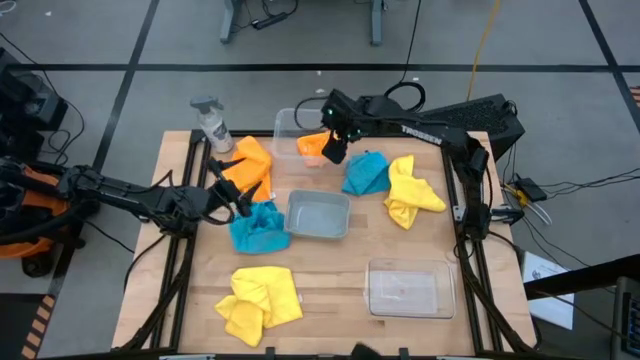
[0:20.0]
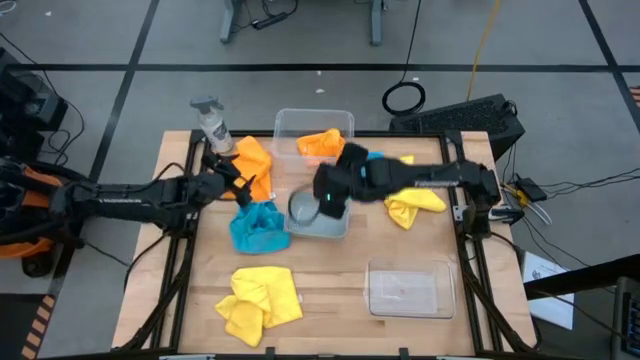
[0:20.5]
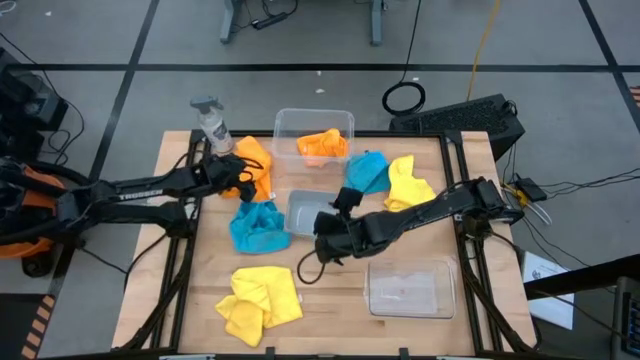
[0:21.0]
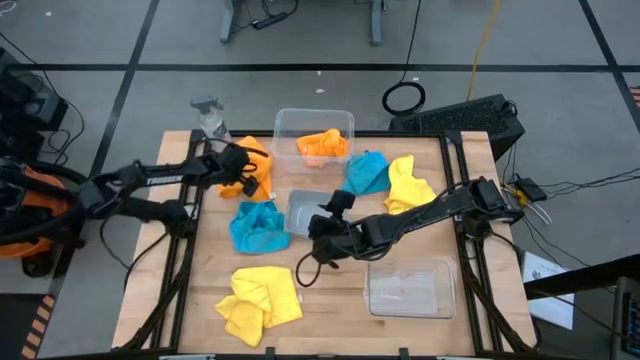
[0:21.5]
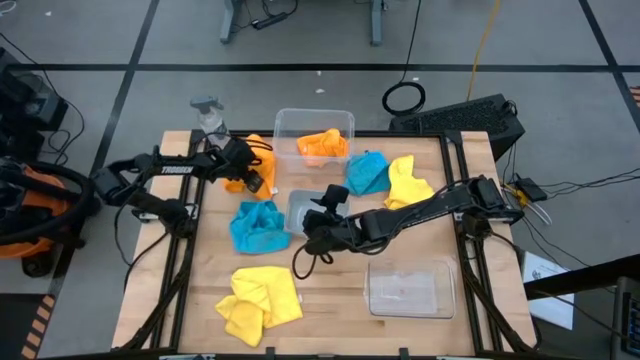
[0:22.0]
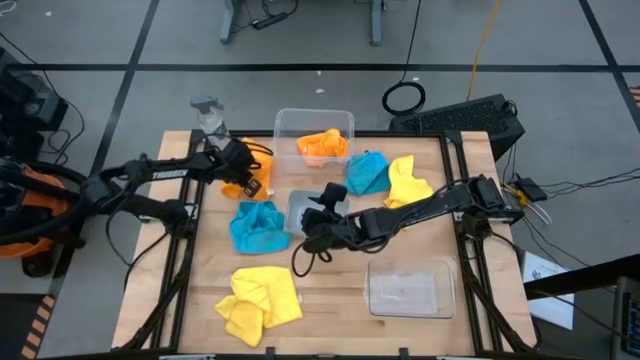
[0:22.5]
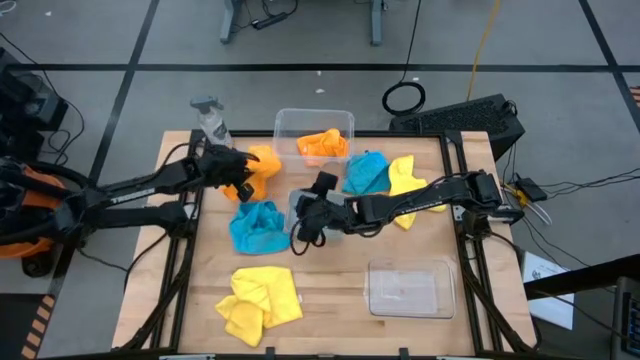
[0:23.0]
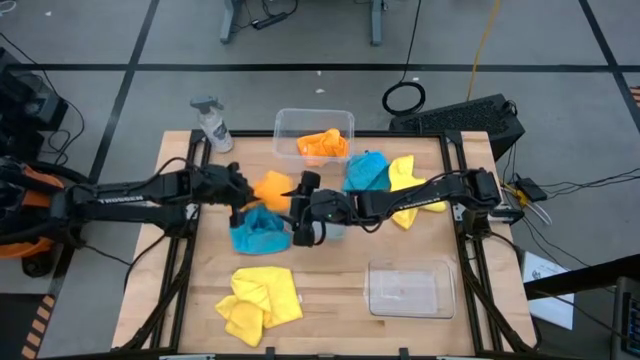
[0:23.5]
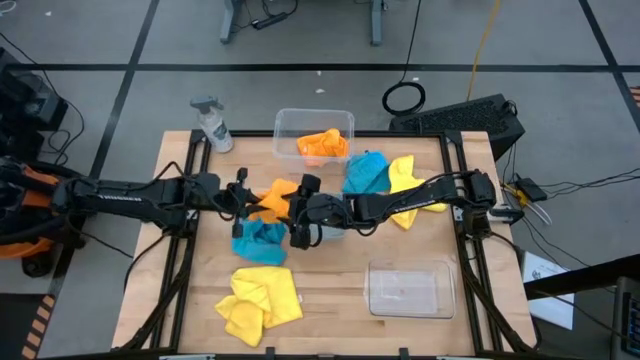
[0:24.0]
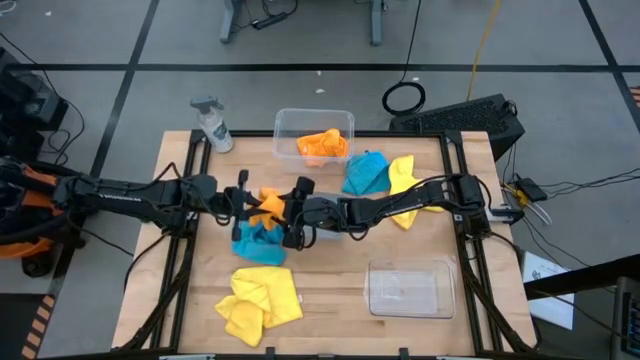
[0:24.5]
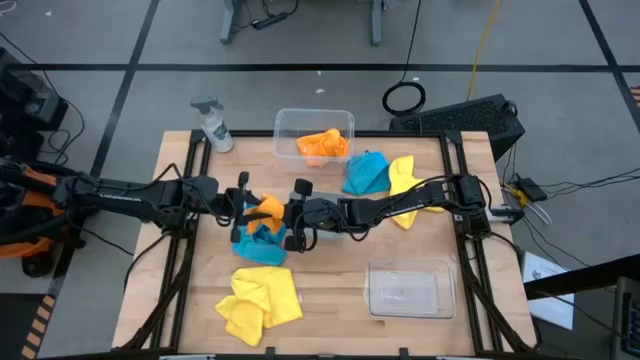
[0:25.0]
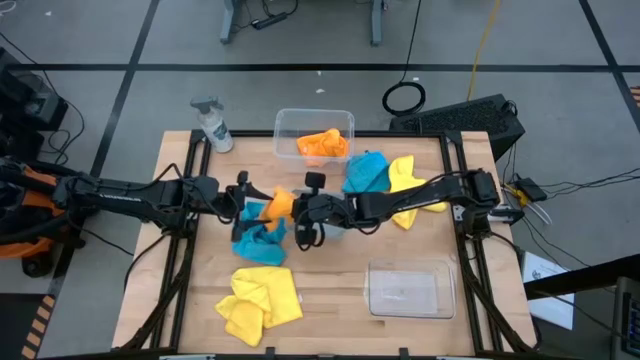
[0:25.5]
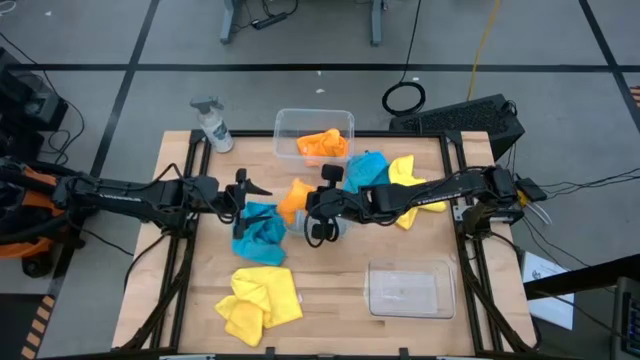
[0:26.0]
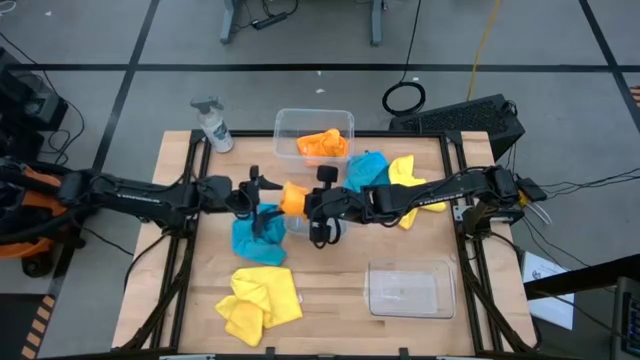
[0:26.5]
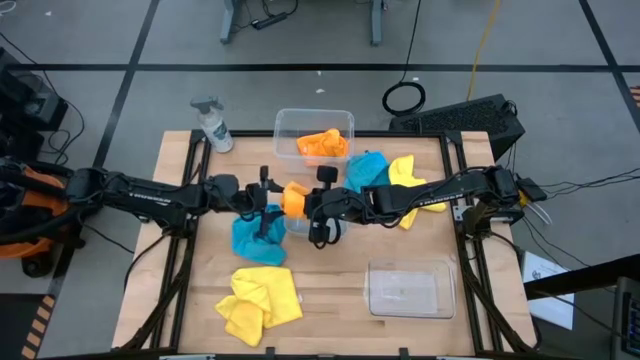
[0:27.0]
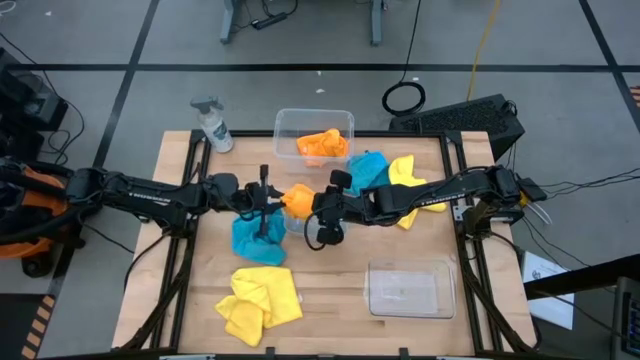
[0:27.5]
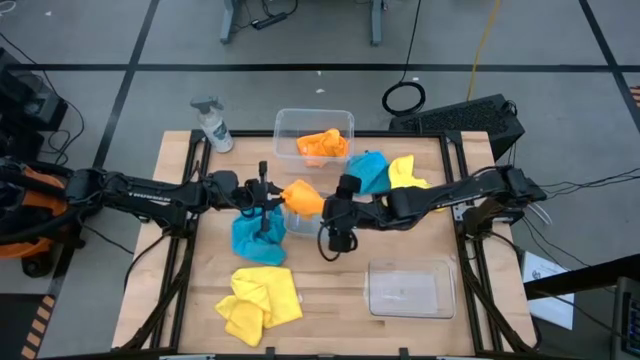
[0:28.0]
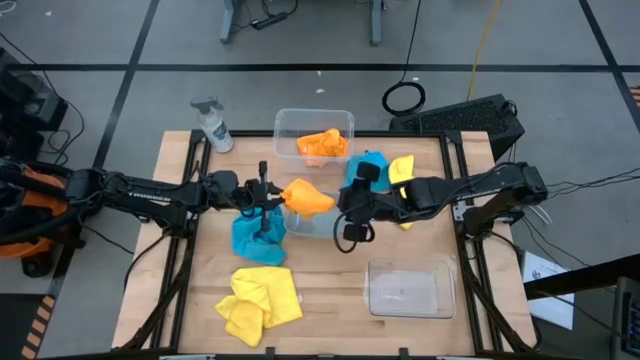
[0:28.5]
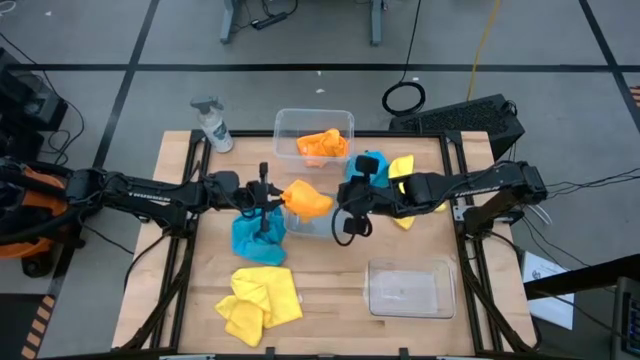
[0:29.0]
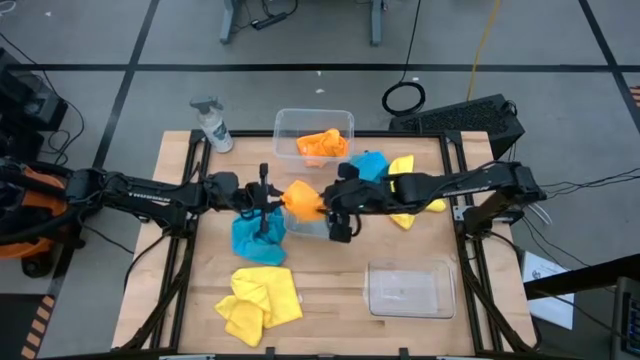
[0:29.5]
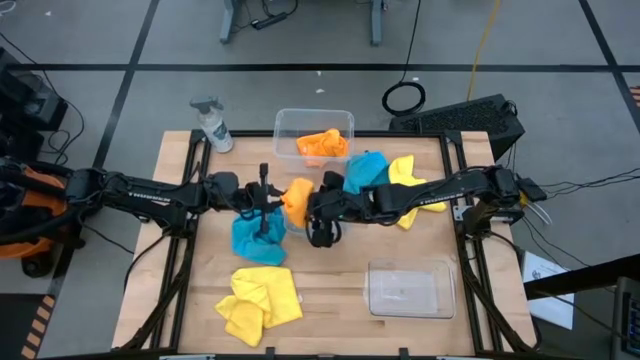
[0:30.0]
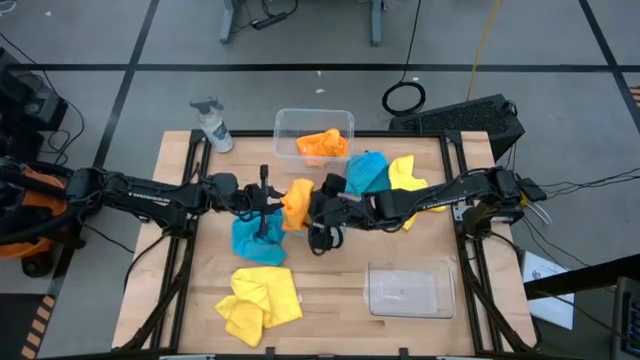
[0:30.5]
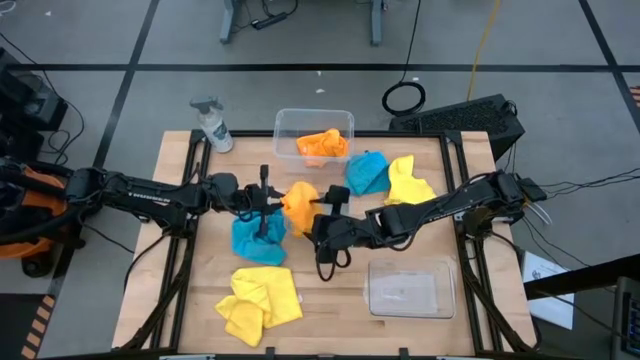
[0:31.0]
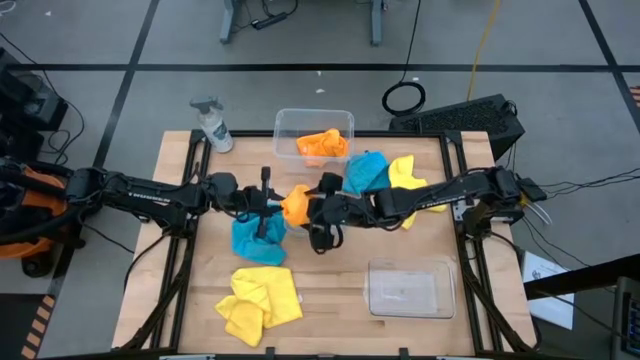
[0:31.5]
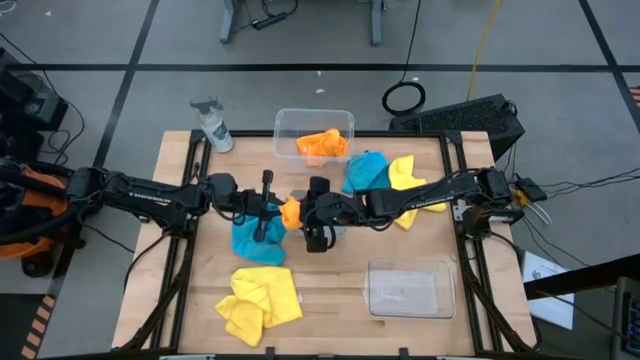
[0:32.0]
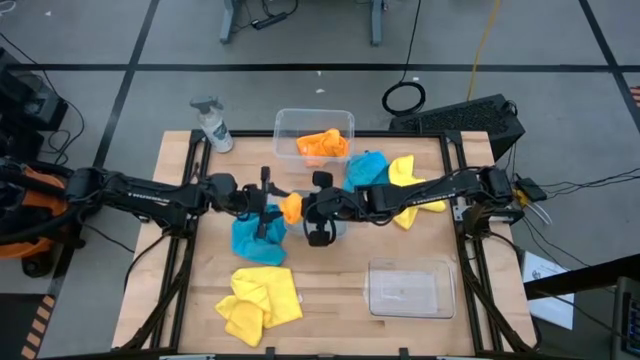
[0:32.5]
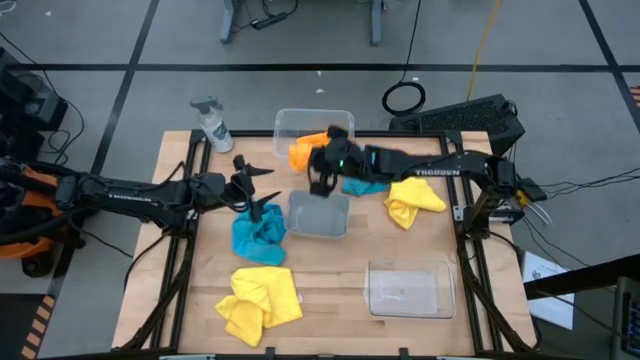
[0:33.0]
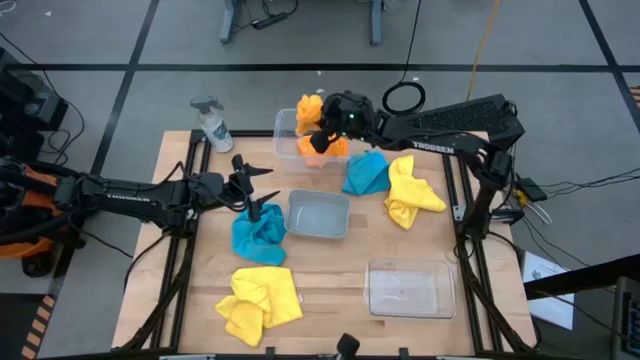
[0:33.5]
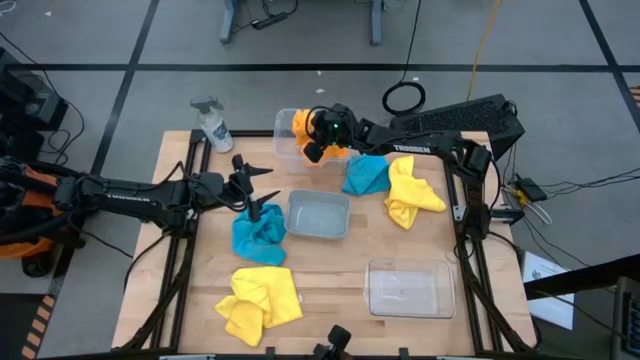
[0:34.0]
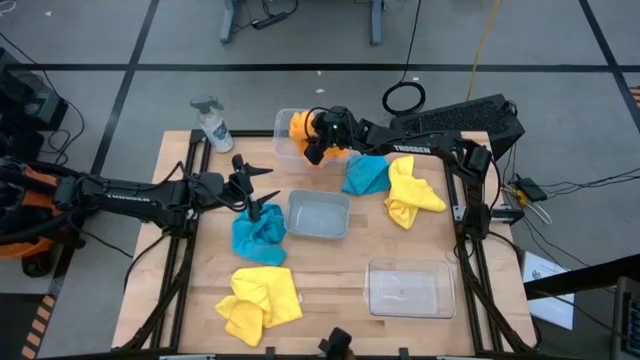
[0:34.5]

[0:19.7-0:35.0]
Task: Sort microfiber towel by color & place in baskets
Put the orange microfiber towel into the top transparent bin
